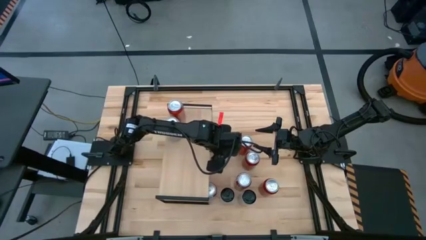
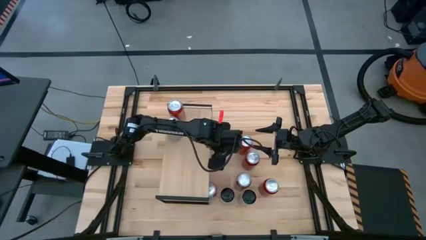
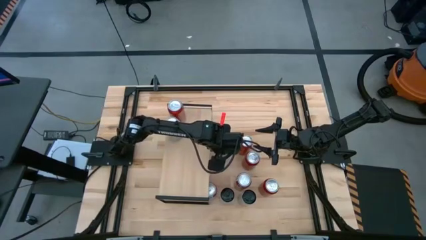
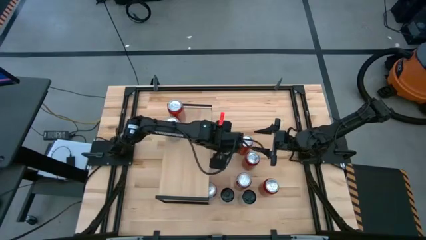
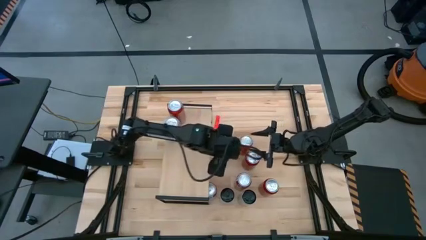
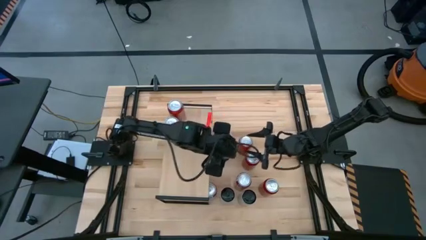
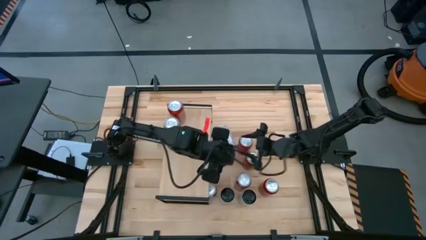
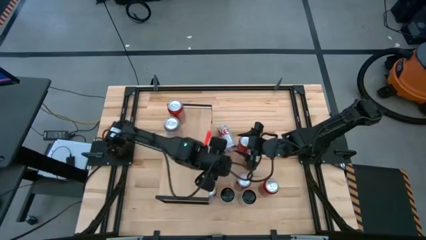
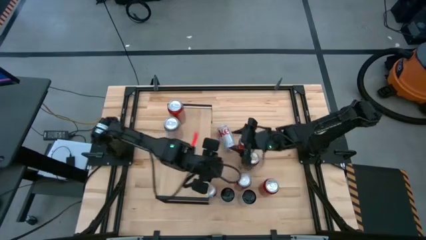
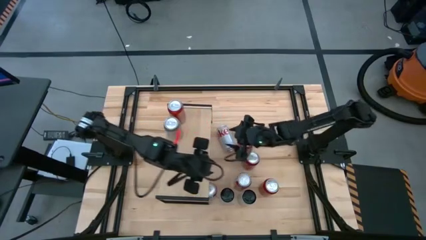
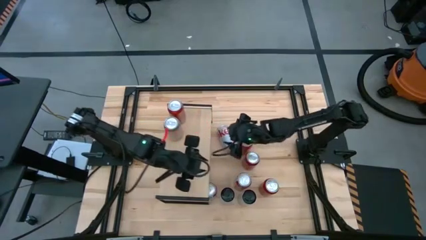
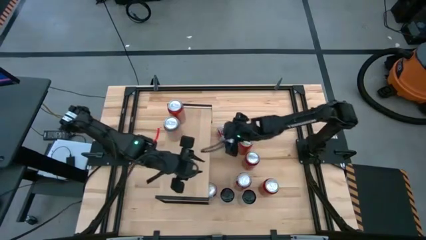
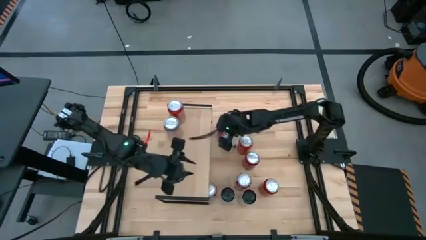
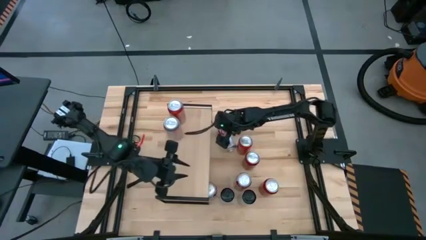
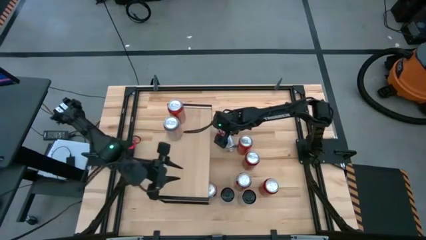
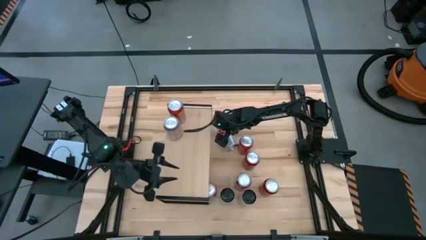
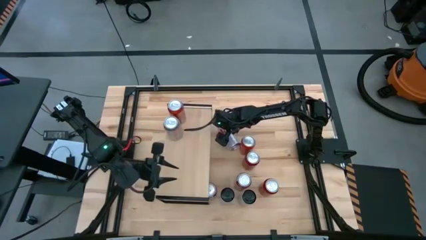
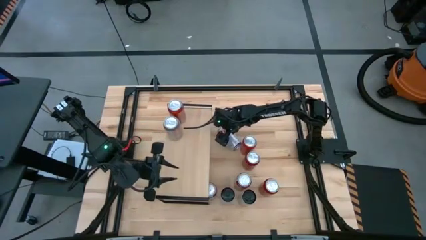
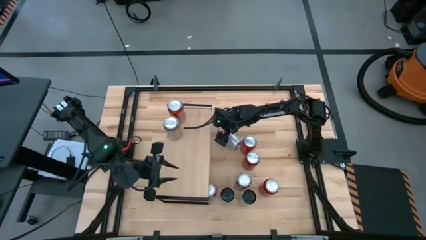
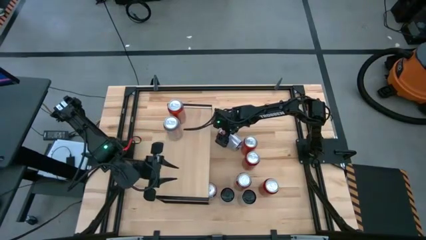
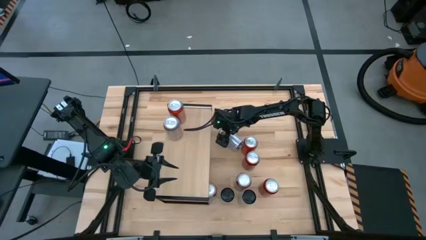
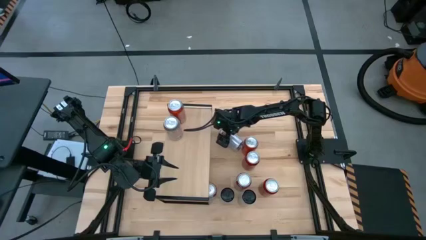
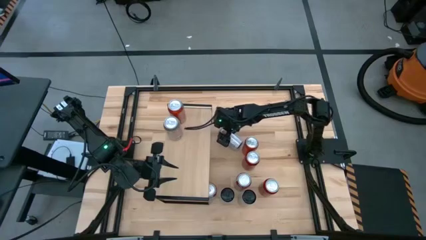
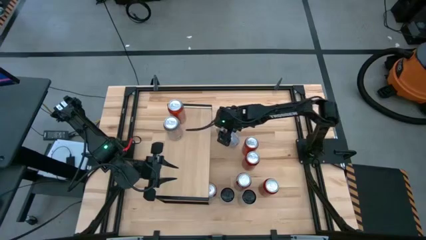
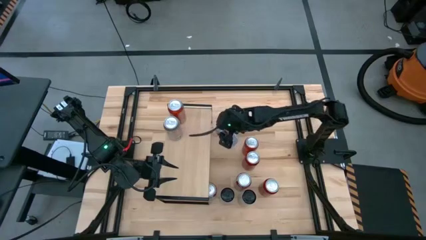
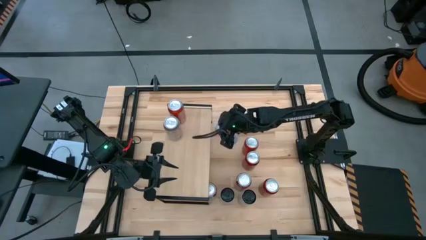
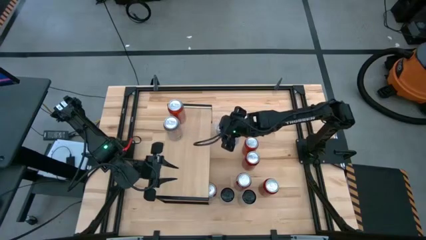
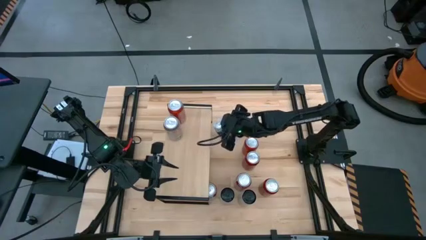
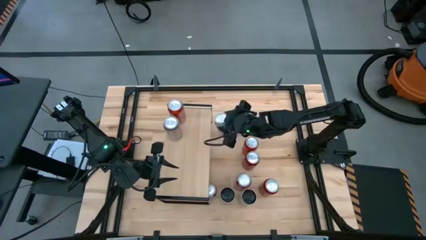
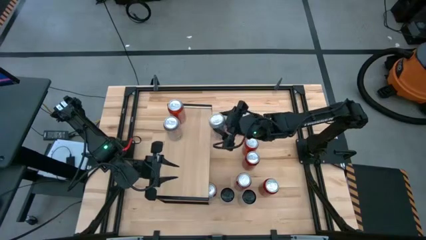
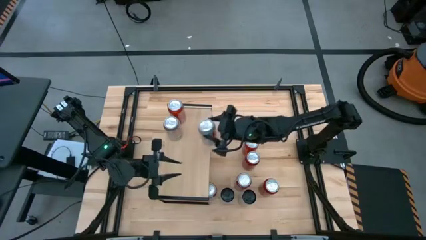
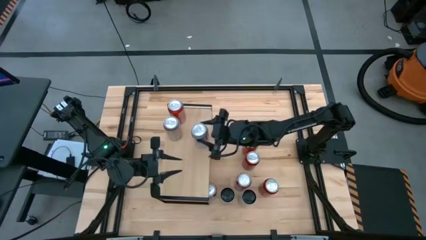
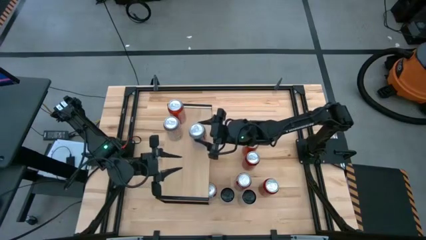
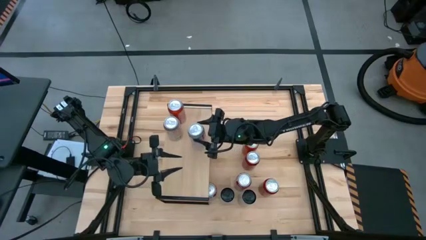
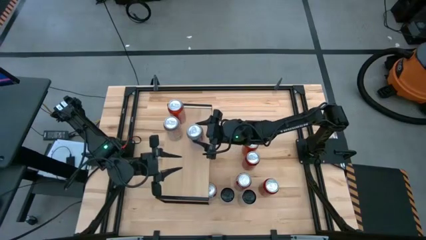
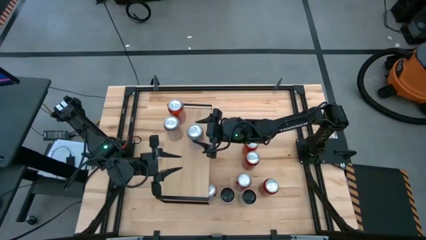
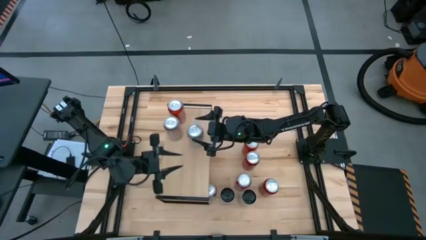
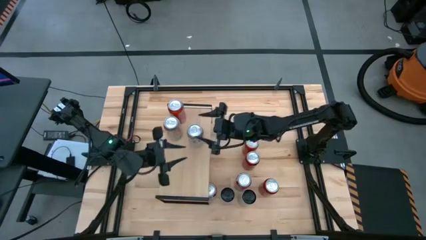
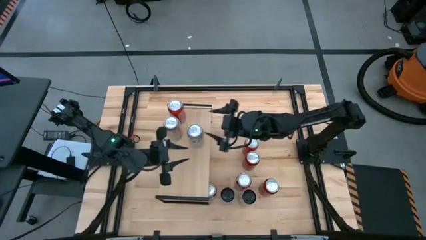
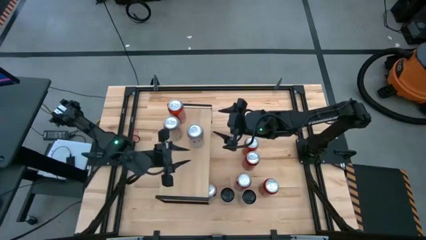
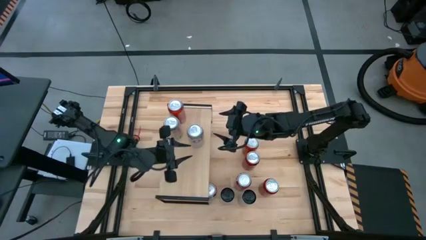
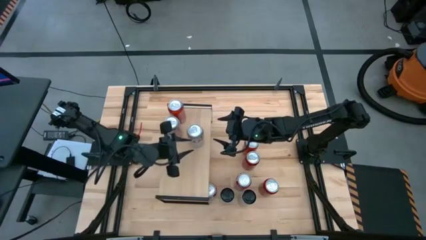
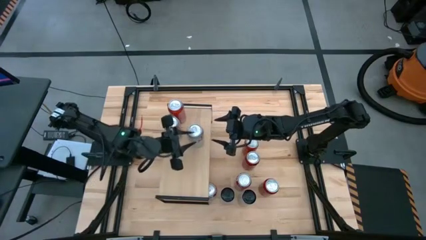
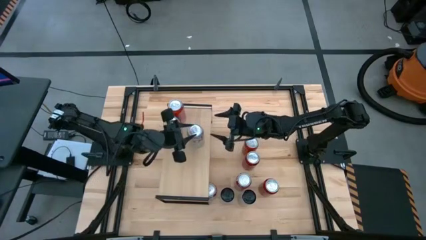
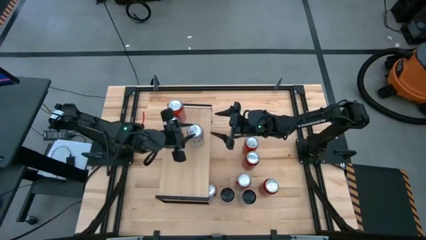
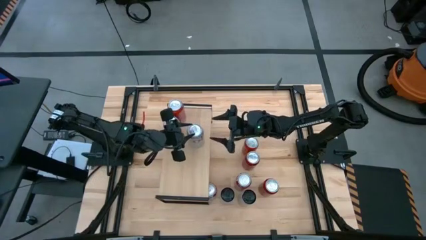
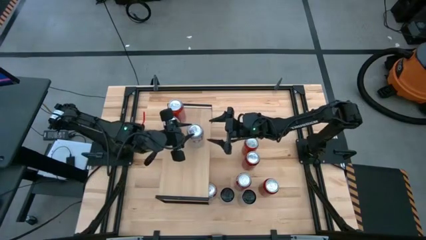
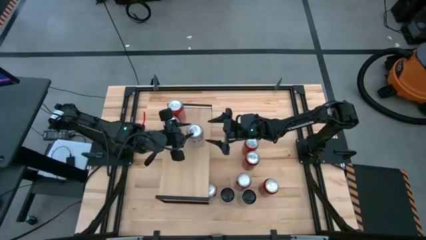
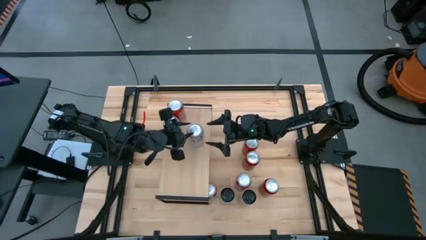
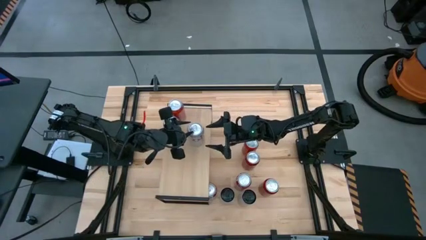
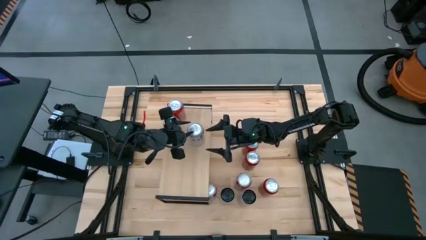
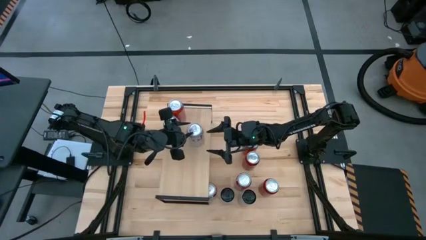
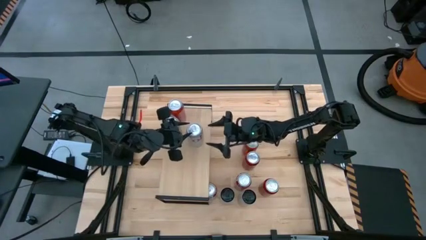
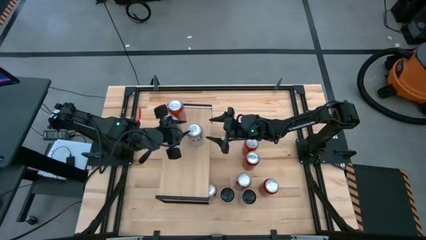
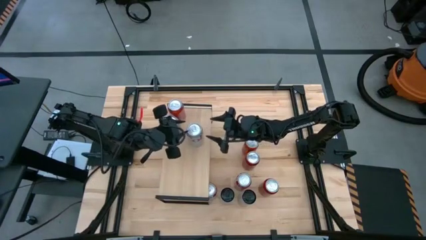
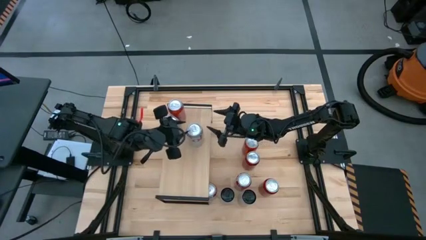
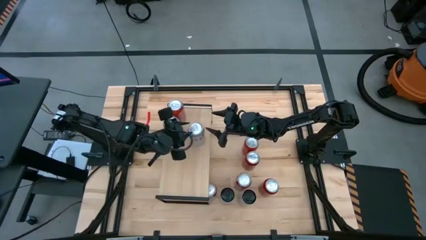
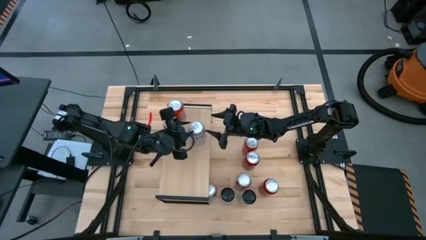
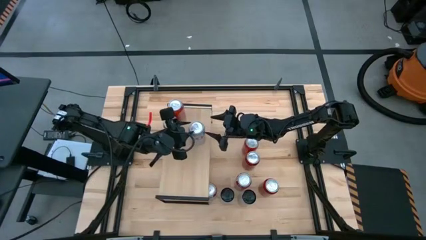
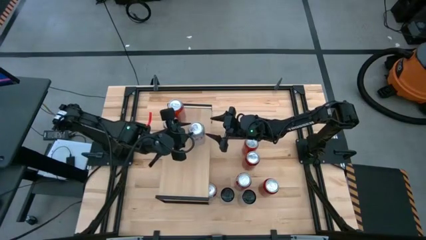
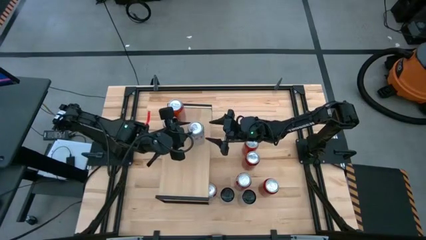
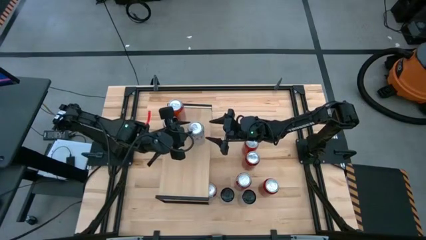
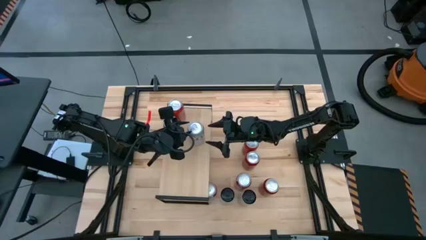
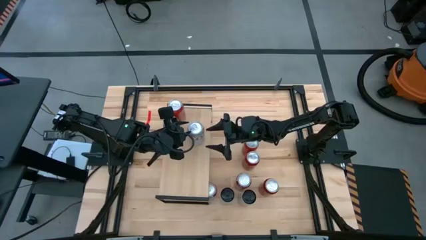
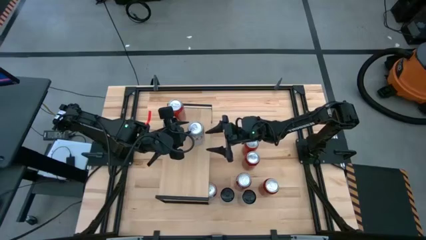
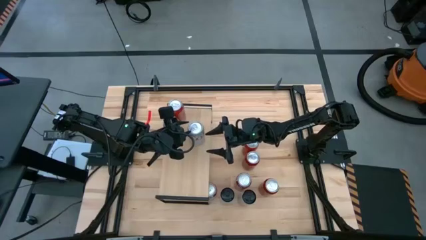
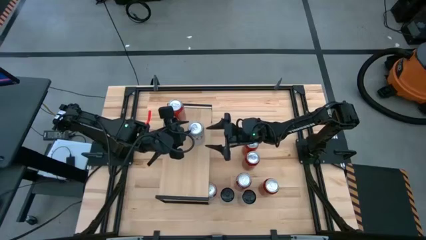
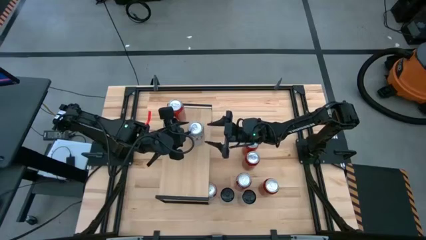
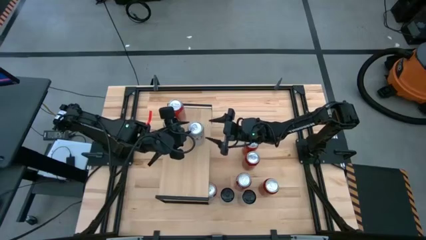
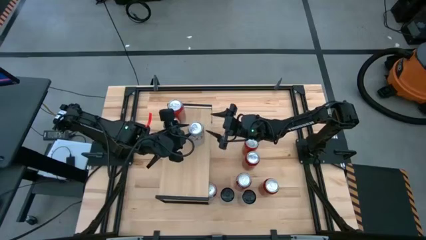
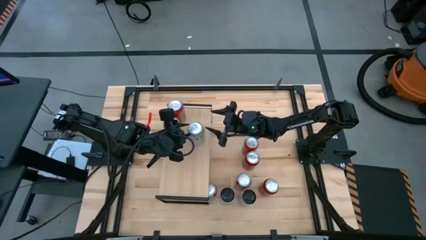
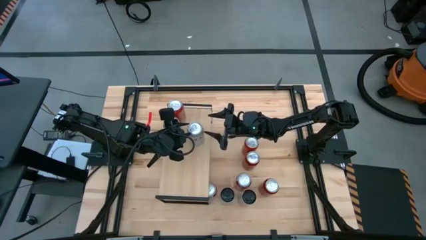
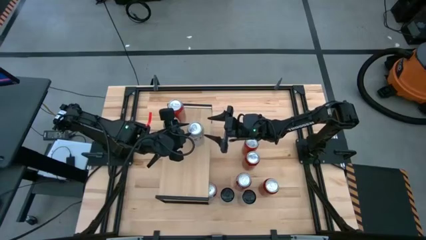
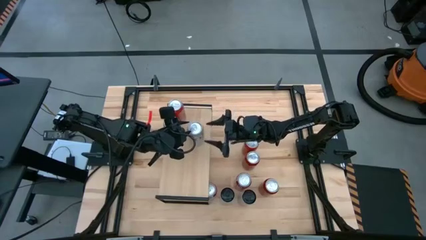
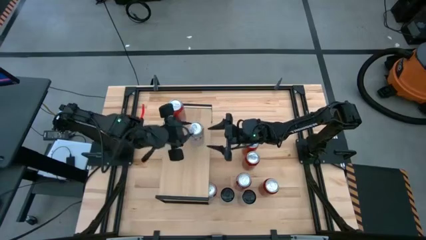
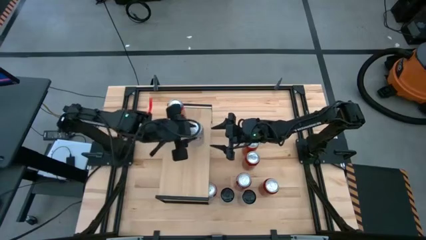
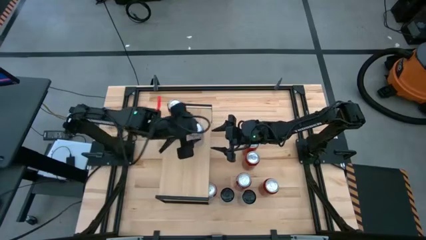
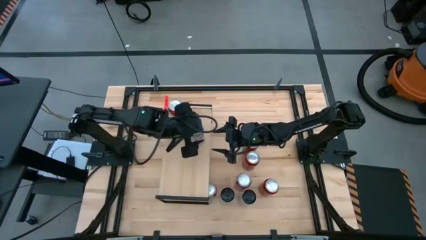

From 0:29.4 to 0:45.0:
Task: Place canned beverage on shelf
Put the silver soda can on the shelf aligned with the other silver soda can
